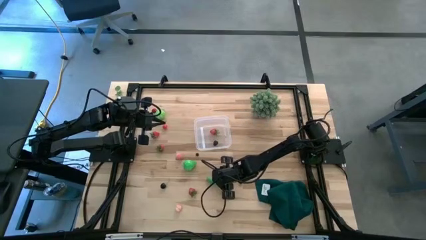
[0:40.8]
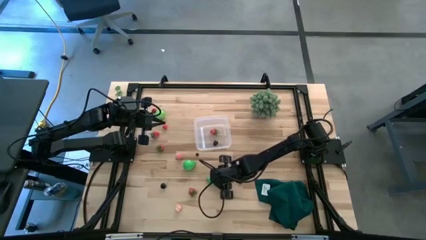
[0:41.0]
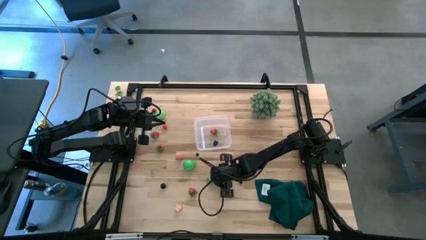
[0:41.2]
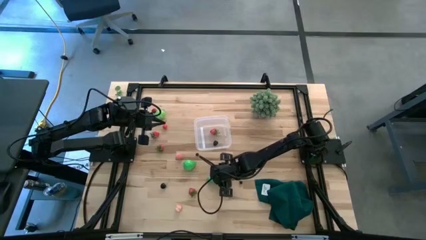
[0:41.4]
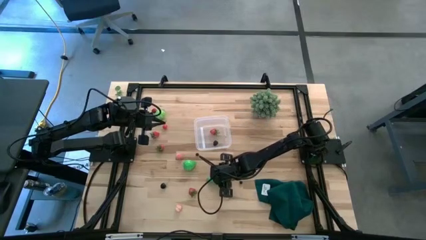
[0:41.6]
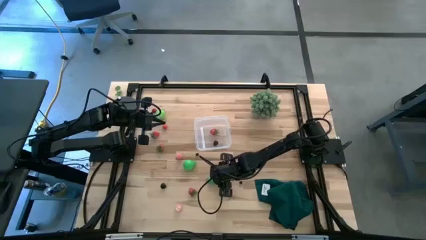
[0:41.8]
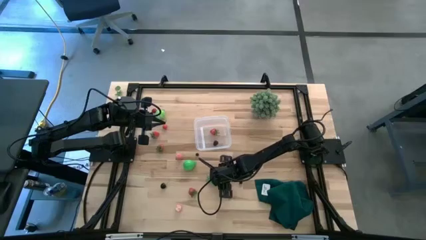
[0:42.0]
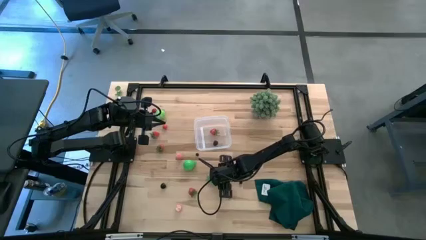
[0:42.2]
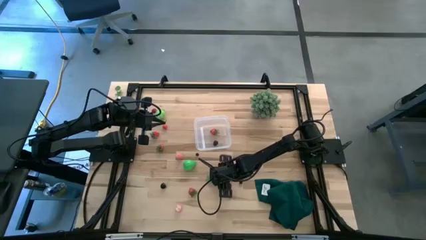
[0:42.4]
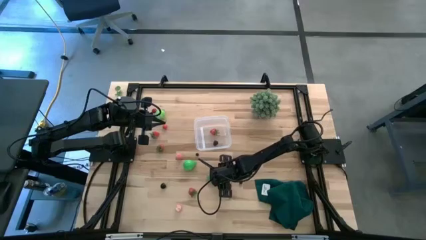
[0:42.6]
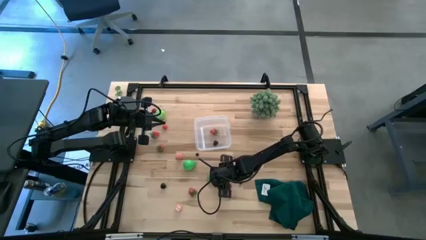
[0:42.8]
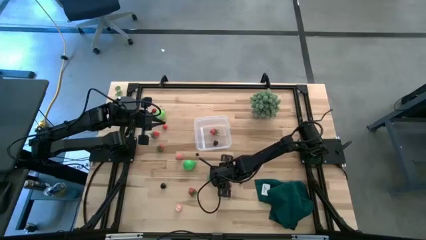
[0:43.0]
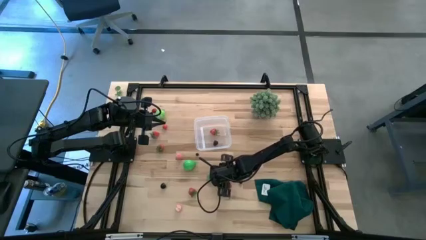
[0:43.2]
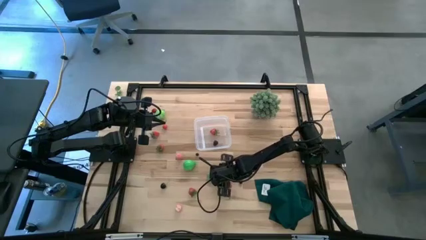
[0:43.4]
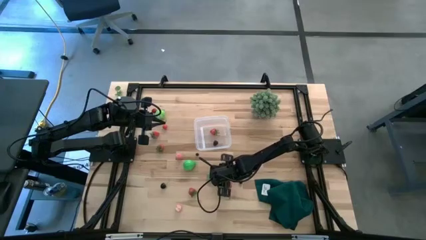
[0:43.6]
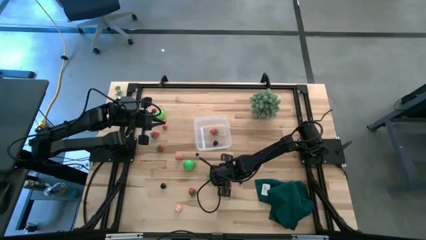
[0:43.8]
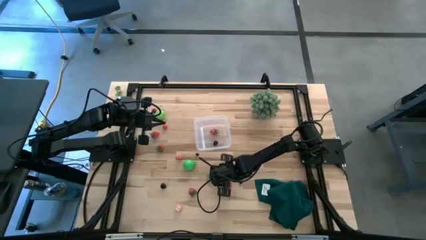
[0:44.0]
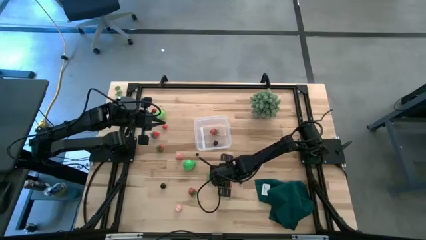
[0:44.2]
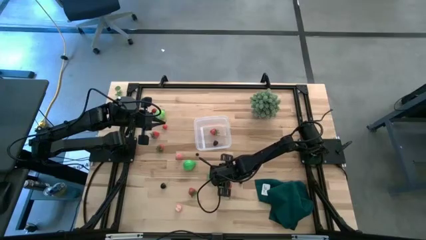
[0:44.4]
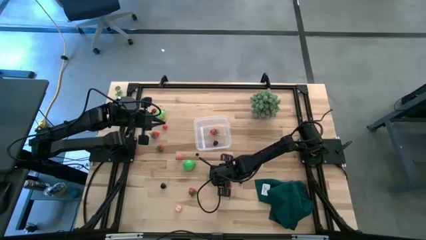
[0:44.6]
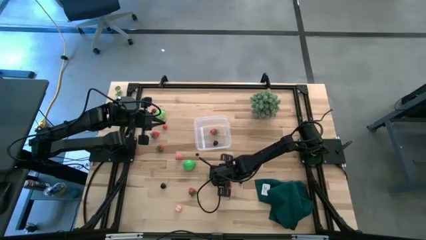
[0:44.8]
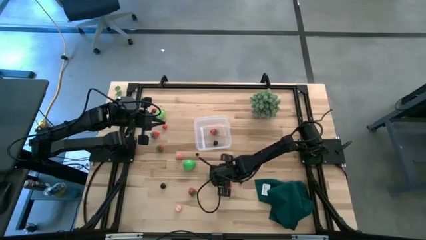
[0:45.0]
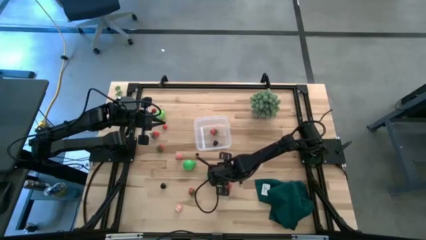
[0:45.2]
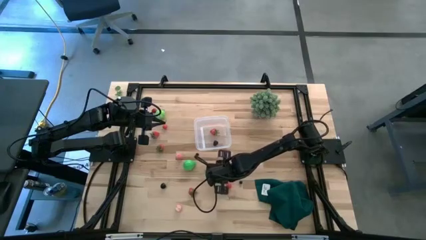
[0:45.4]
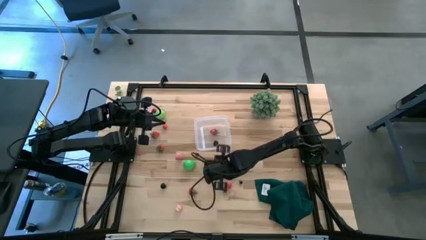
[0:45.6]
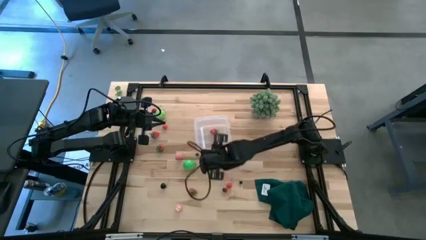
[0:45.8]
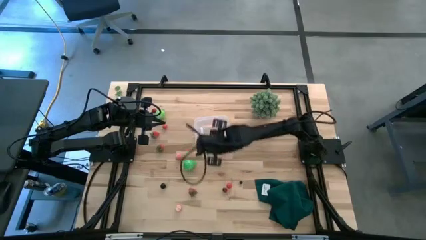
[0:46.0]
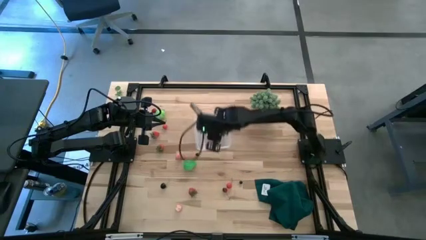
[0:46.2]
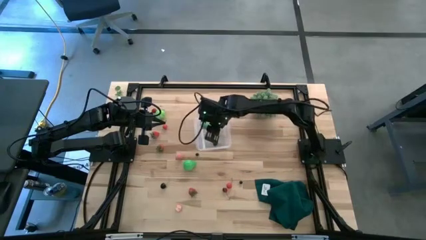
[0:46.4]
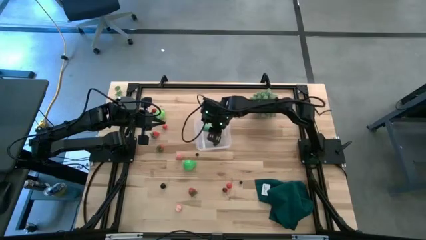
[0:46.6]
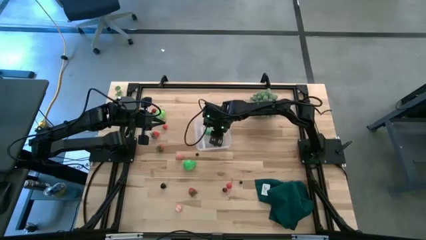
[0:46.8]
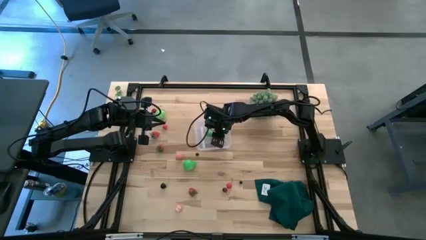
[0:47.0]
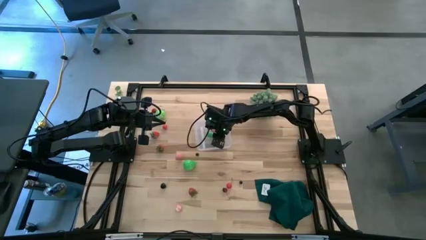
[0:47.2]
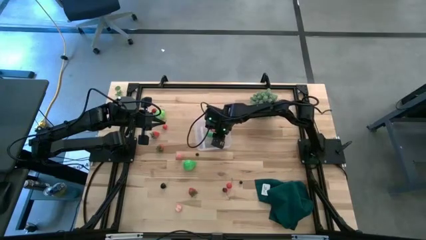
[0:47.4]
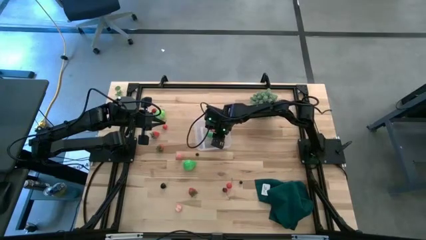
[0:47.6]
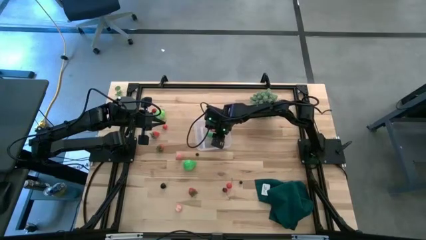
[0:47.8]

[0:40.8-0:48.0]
Task: Pick and placing Produce into tupperware
Put the green pea pod into the transparent bin

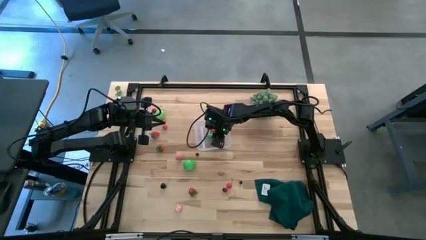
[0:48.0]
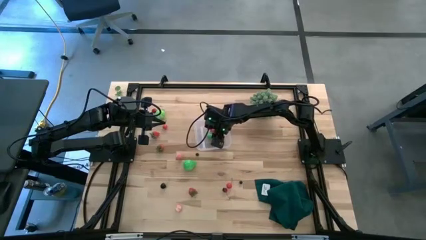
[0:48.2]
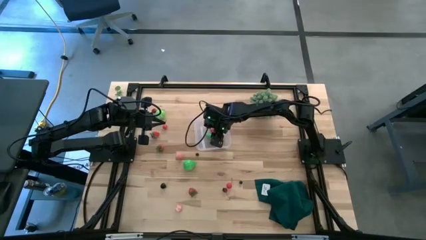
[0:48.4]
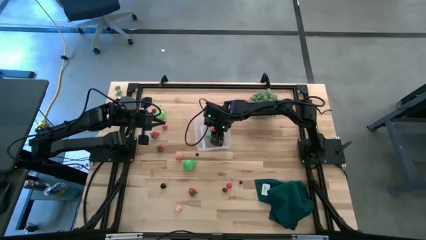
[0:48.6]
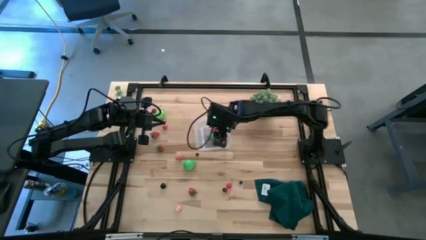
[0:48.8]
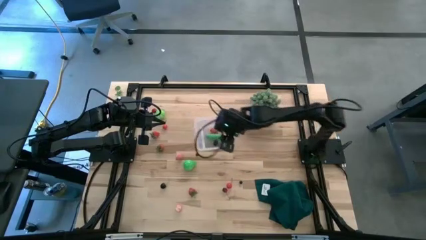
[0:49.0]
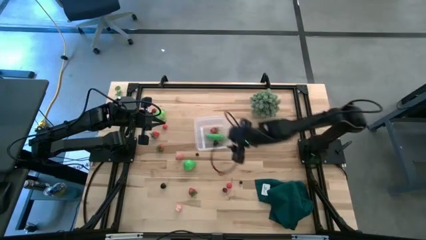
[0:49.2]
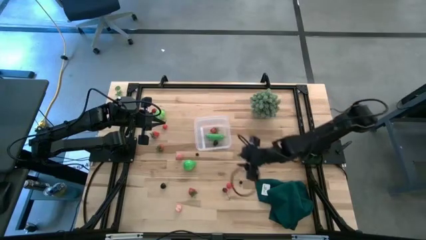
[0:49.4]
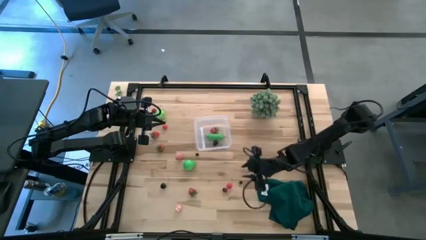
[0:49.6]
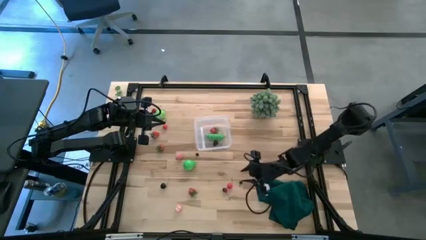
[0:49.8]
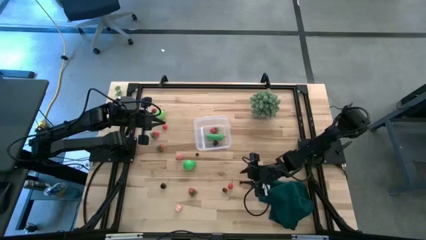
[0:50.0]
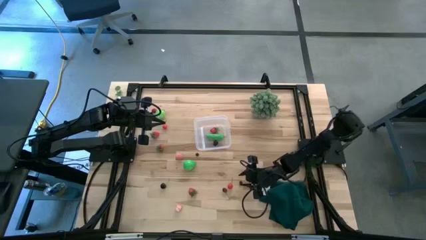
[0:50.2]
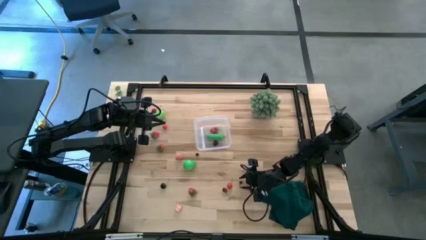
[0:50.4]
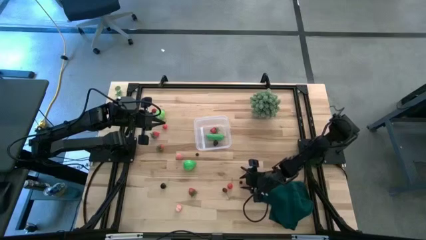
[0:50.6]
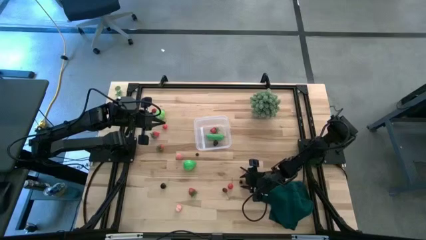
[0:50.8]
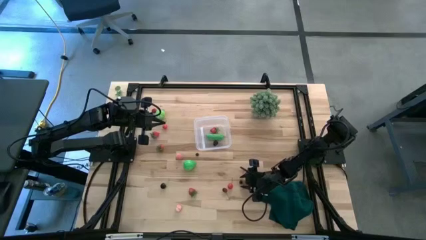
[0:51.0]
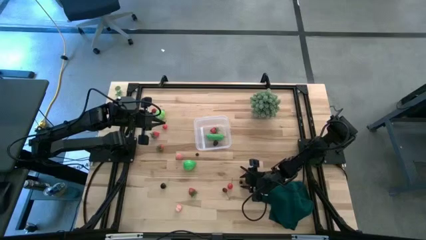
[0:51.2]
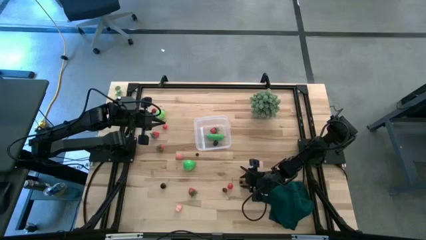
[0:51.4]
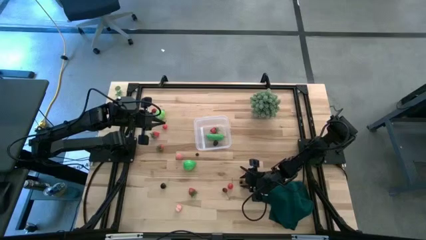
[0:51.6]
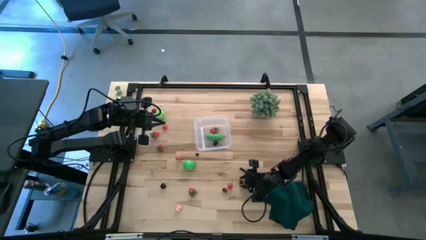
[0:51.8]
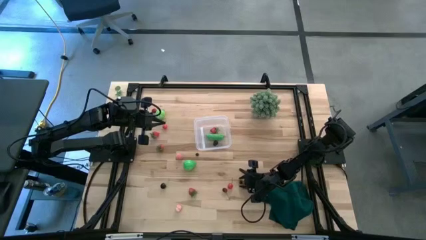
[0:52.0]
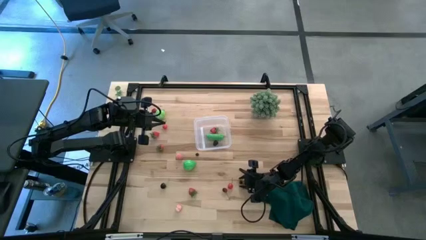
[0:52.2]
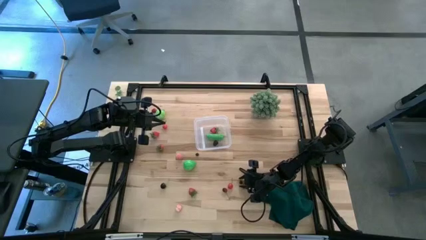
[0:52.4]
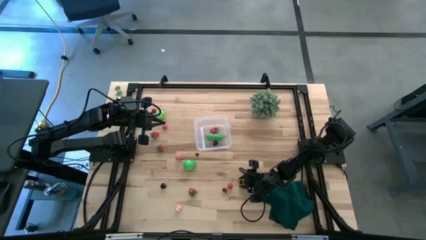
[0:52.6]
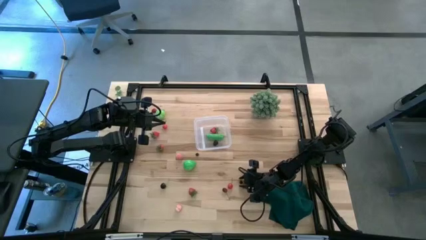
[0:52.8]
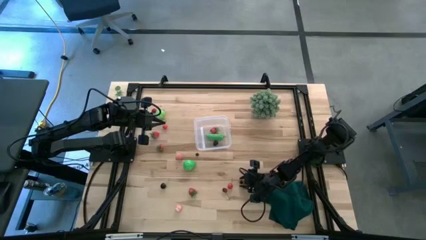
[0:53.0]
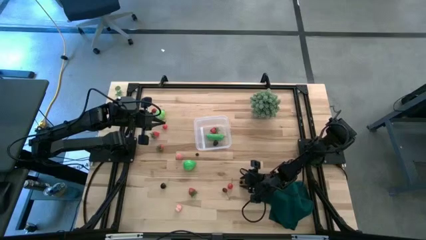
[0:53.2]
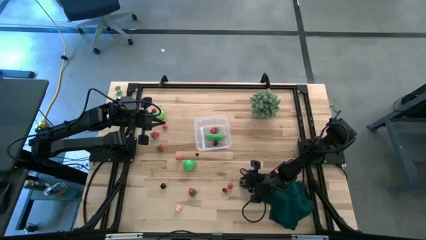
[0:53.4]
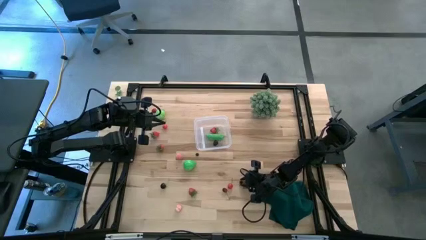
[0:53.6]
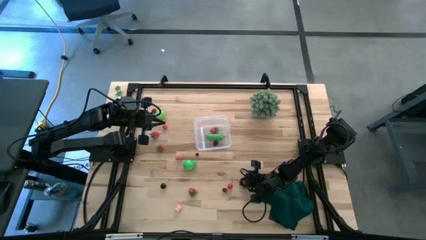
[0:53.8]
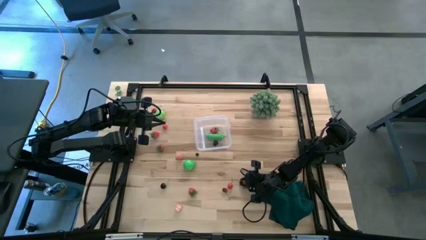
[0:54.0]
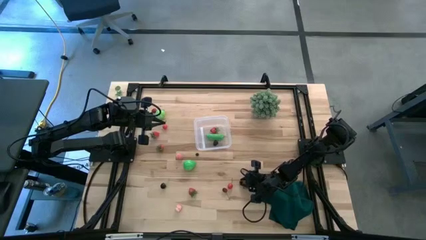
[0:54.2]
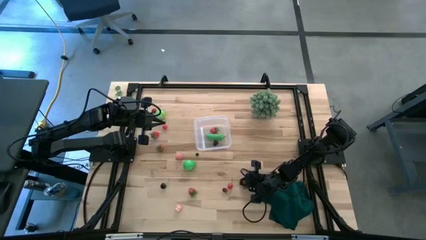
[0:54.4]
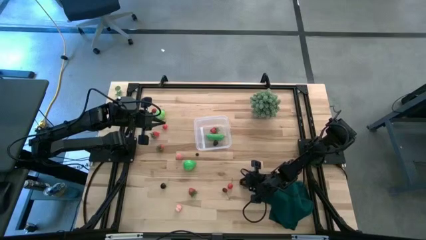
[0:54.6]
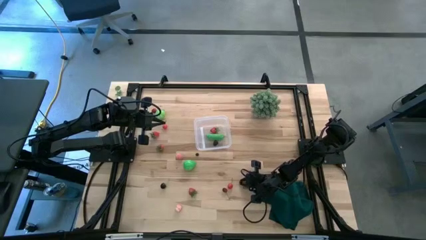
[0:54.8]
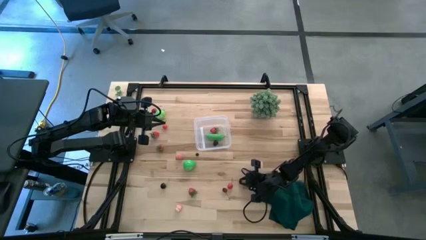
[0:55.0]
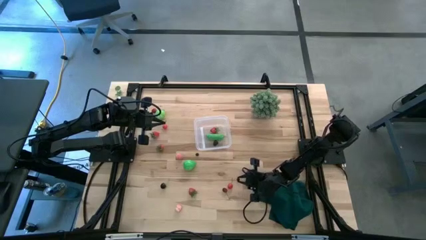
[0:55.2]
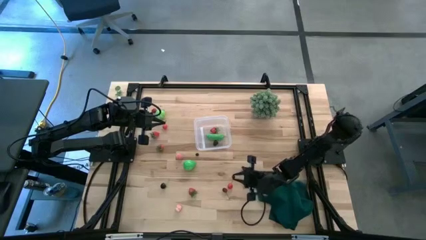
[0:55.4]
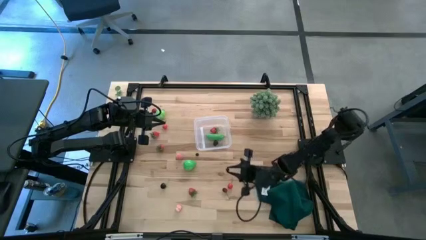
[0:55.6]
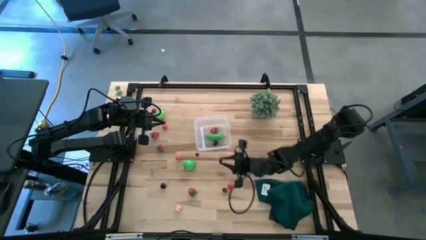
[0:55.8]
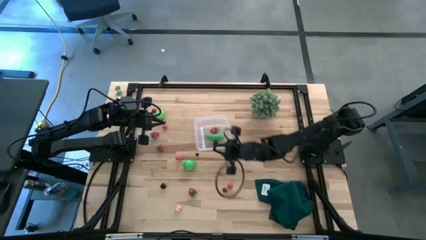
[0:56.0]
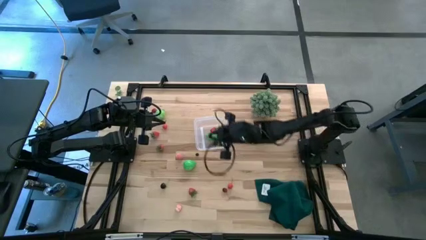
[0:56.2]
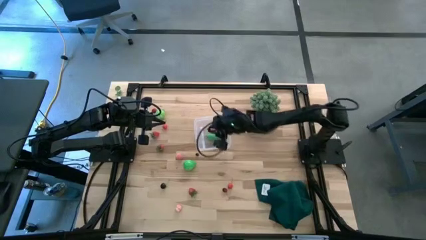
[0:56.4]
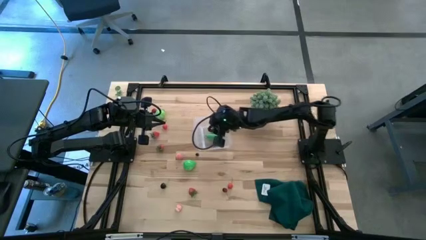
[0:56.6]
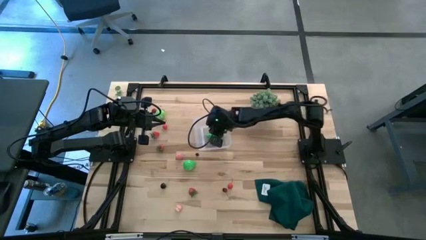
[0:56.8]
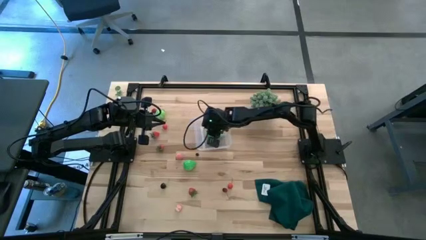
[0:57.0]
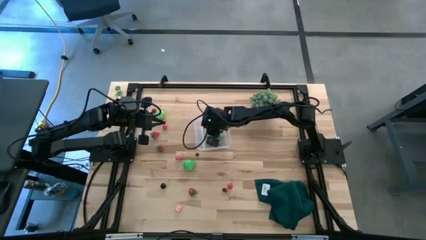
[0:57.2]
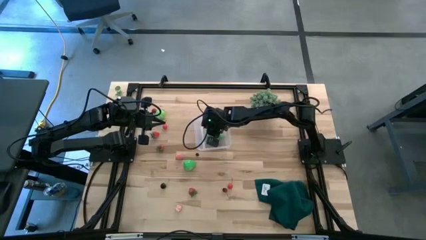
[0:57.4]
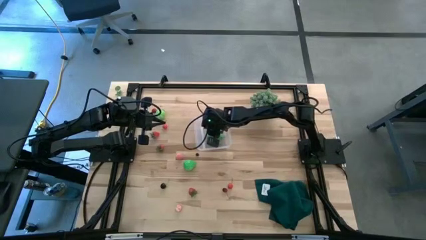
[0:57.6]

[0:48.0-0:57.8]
Put the black olive into the transparent bin
